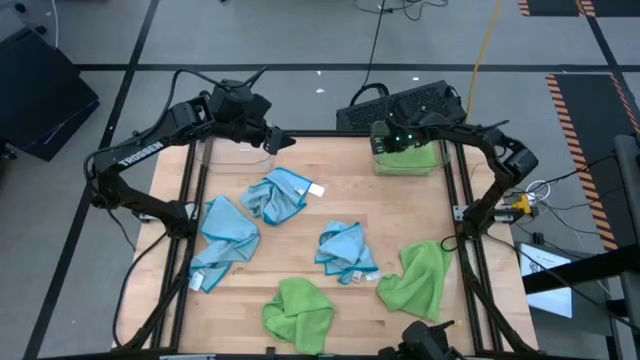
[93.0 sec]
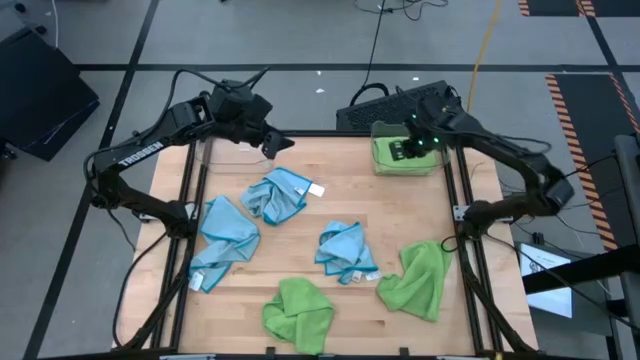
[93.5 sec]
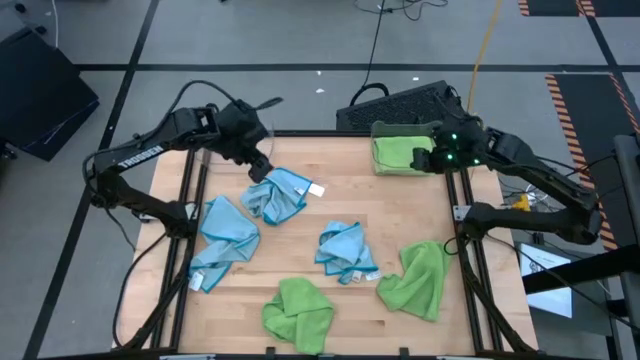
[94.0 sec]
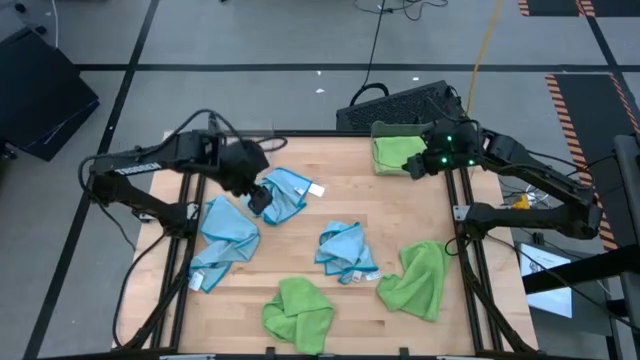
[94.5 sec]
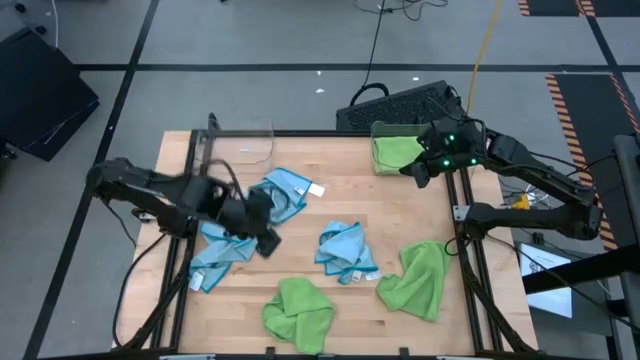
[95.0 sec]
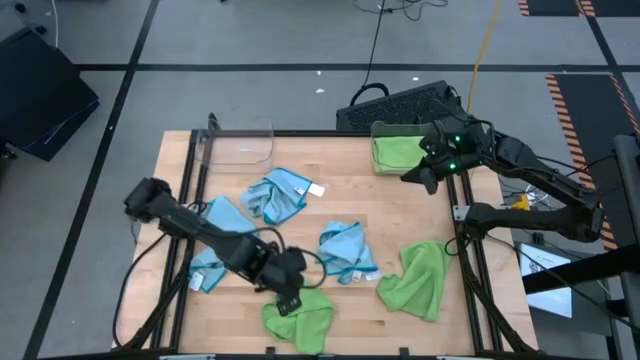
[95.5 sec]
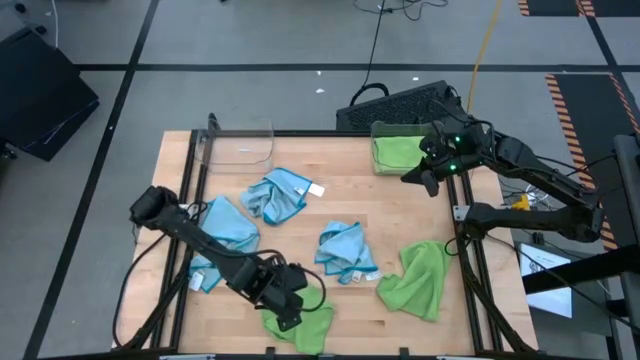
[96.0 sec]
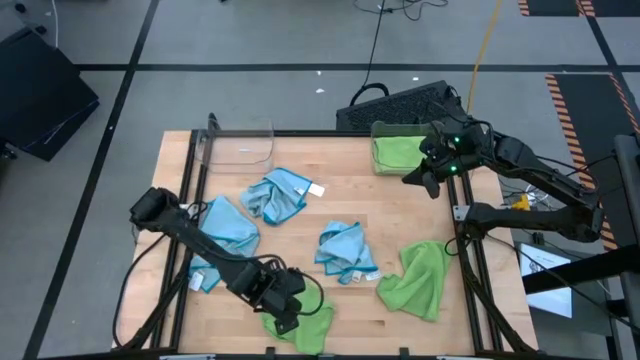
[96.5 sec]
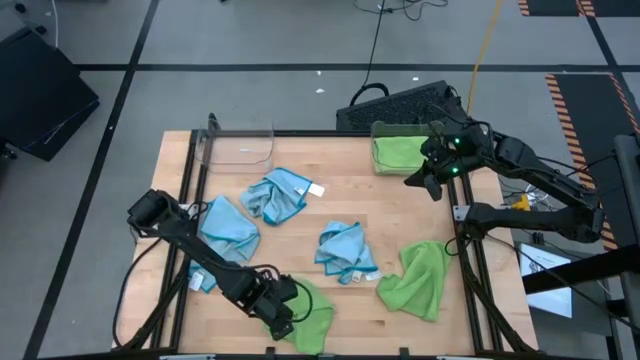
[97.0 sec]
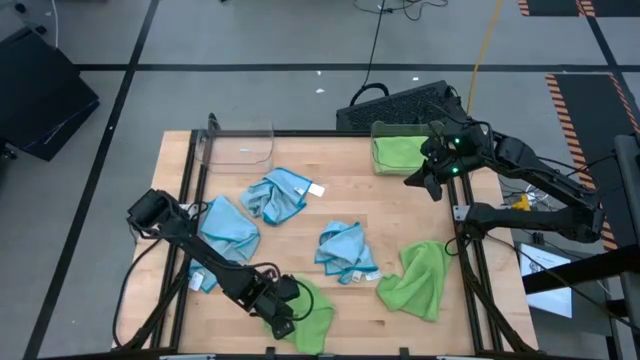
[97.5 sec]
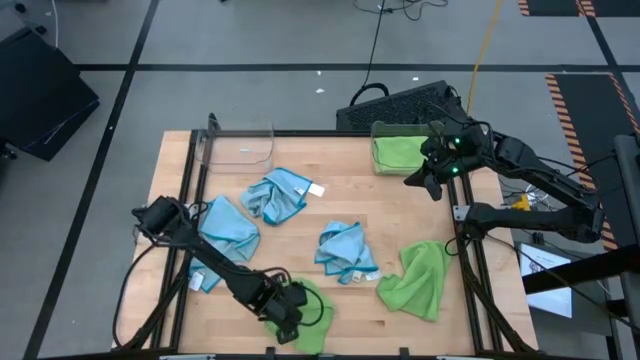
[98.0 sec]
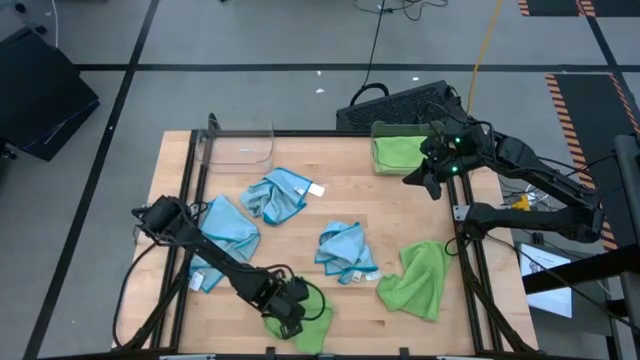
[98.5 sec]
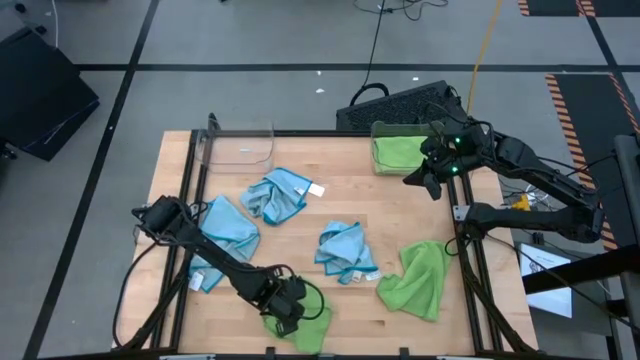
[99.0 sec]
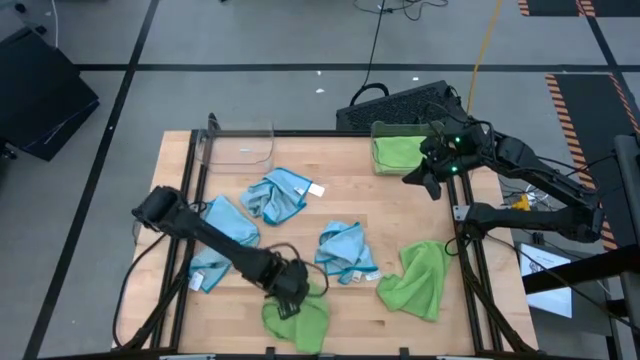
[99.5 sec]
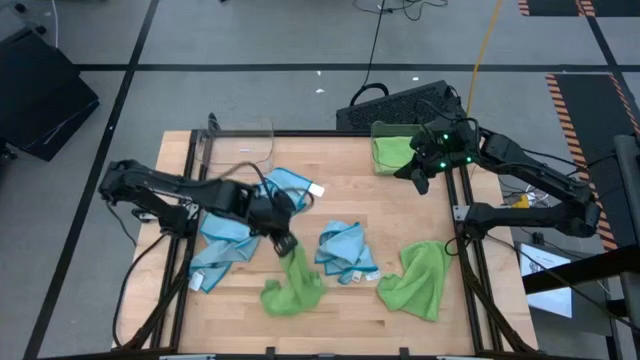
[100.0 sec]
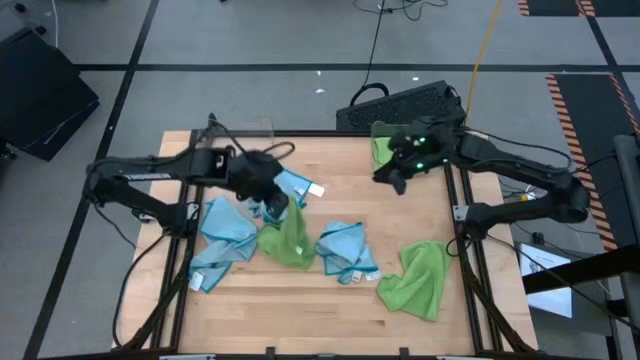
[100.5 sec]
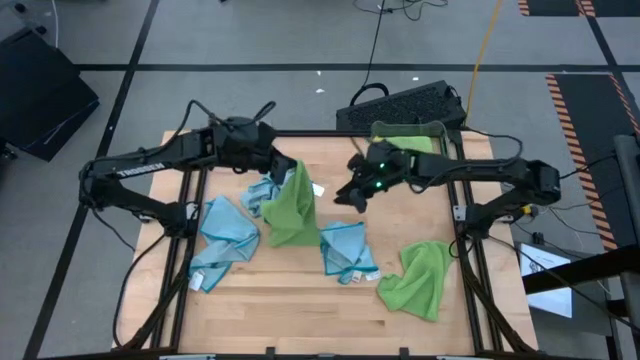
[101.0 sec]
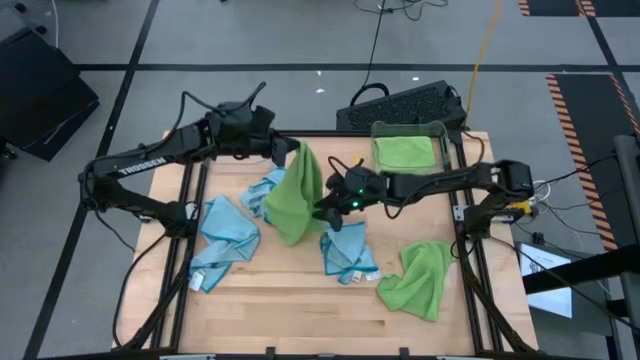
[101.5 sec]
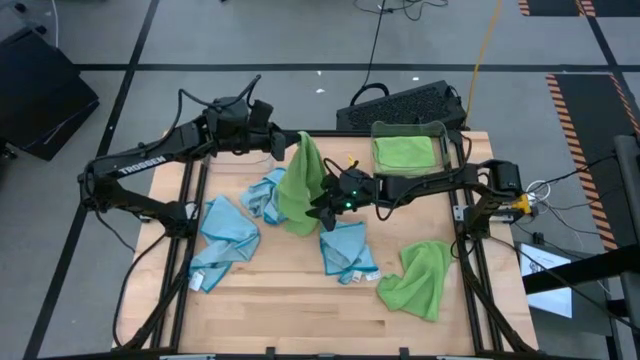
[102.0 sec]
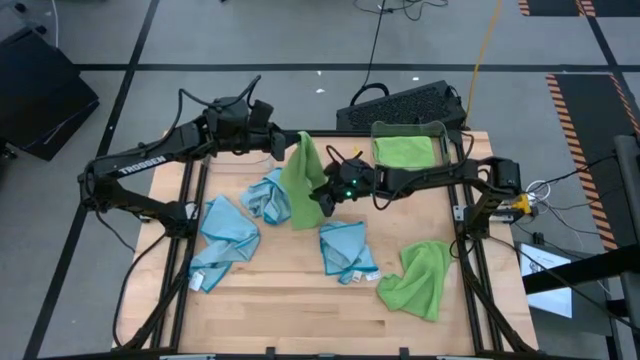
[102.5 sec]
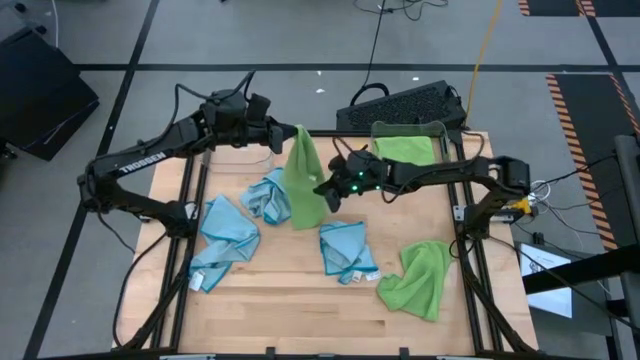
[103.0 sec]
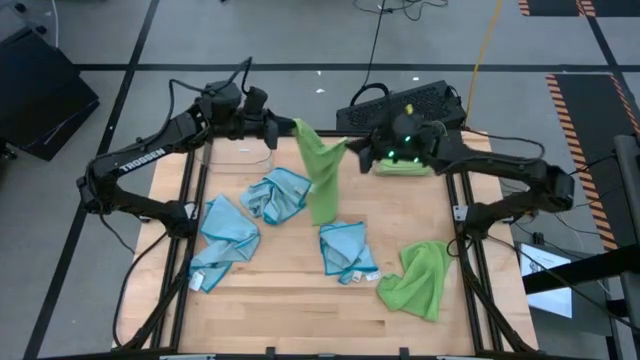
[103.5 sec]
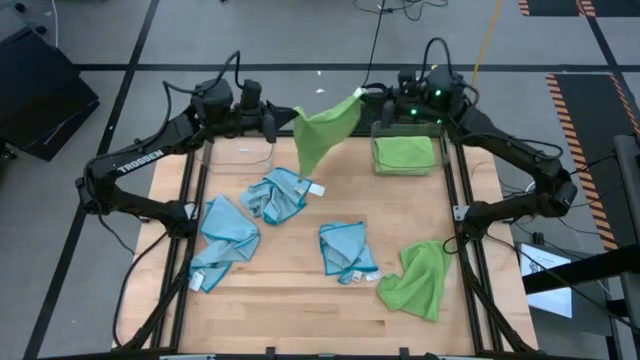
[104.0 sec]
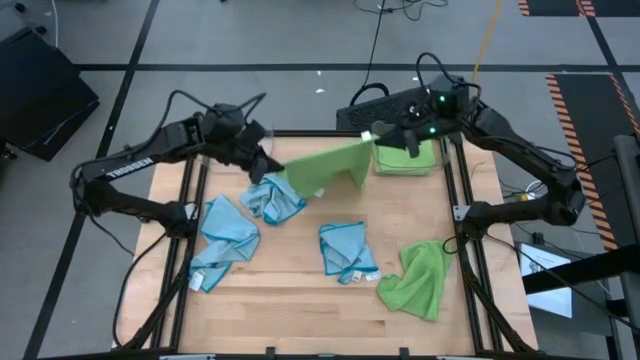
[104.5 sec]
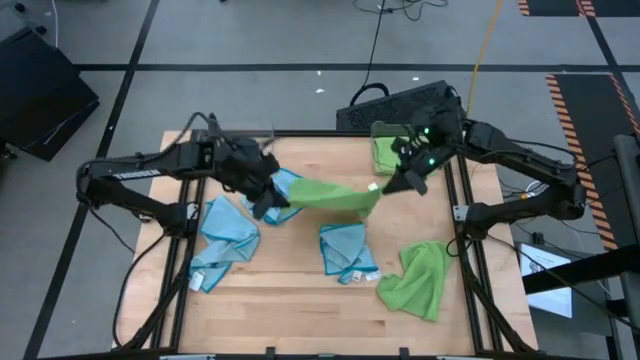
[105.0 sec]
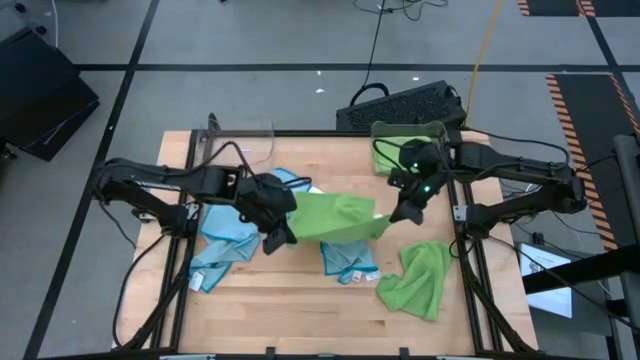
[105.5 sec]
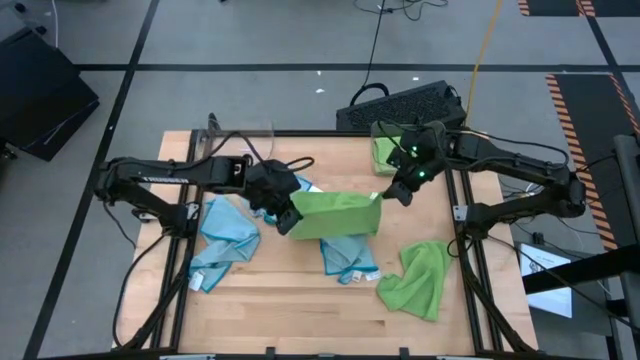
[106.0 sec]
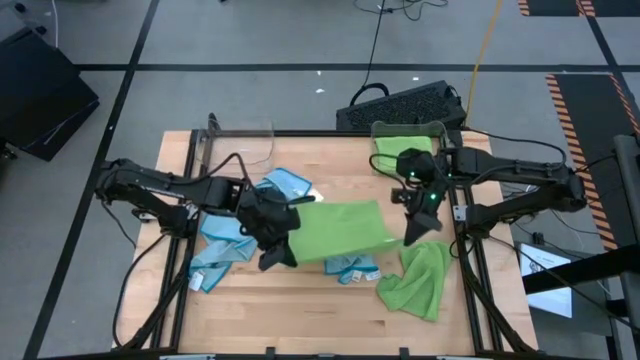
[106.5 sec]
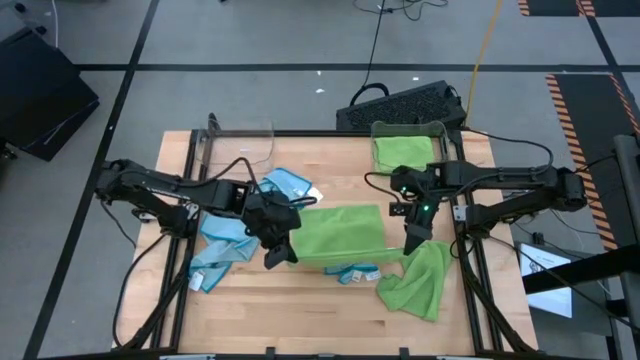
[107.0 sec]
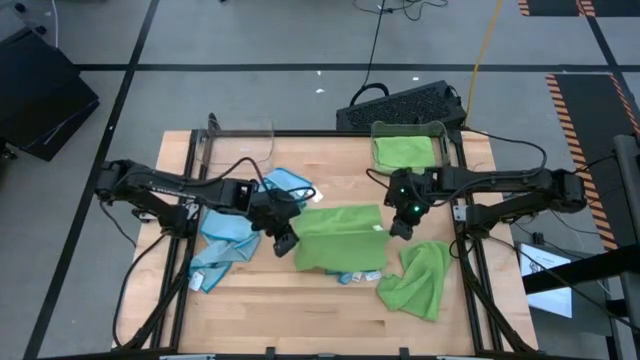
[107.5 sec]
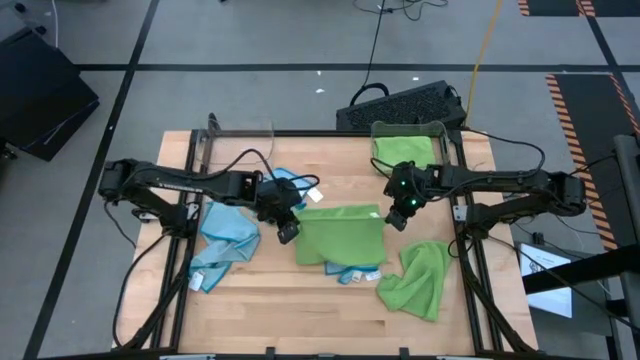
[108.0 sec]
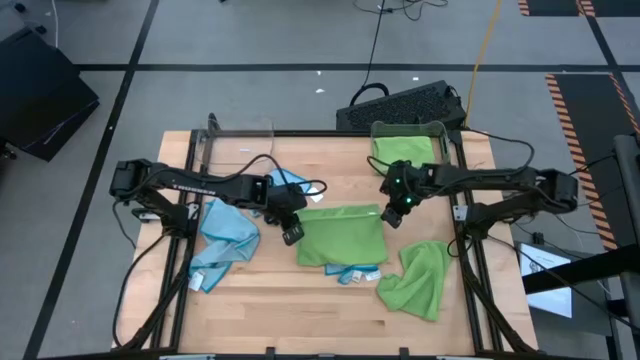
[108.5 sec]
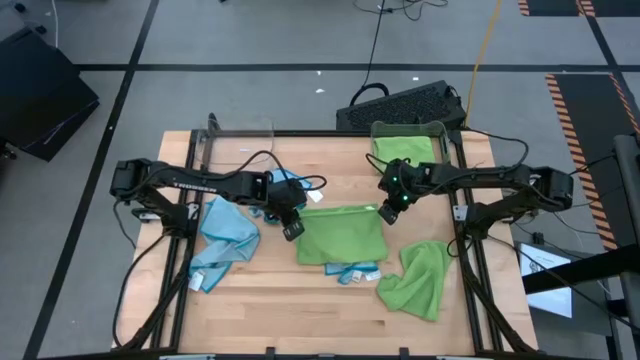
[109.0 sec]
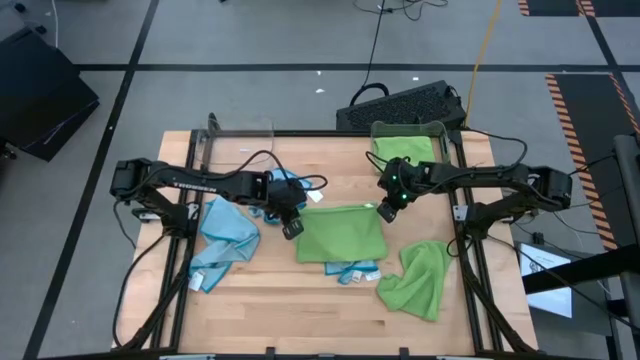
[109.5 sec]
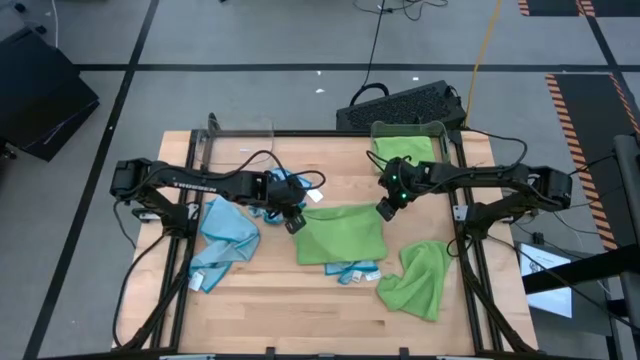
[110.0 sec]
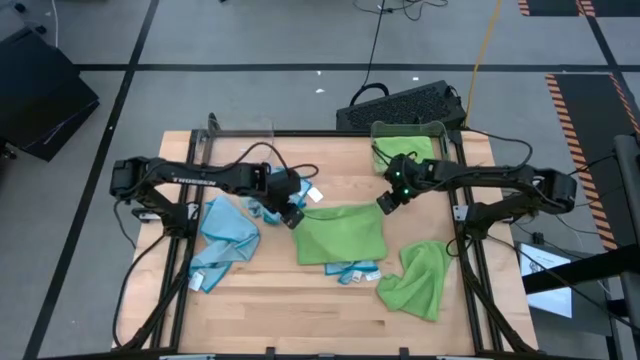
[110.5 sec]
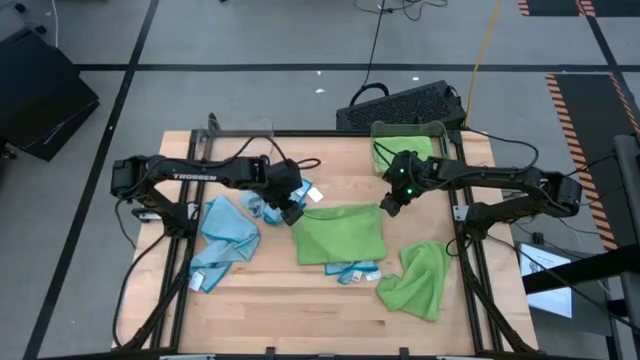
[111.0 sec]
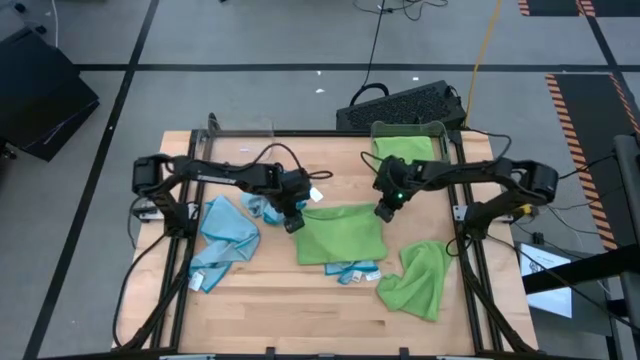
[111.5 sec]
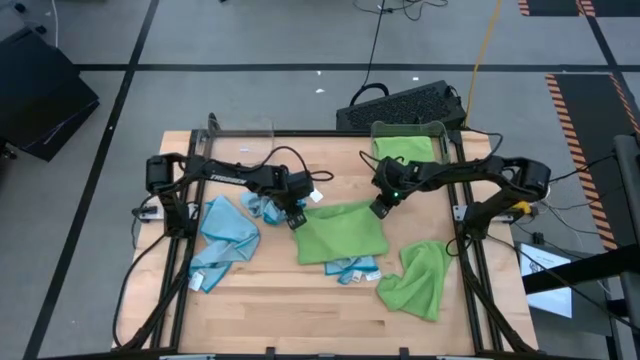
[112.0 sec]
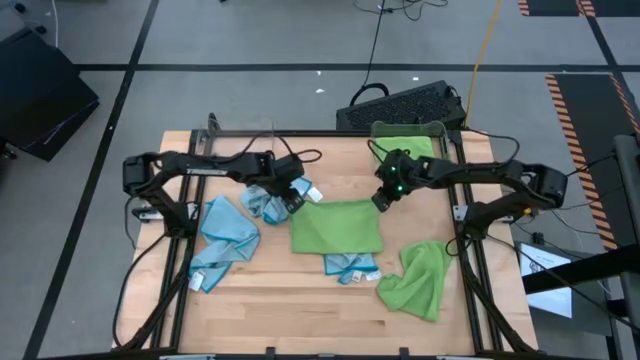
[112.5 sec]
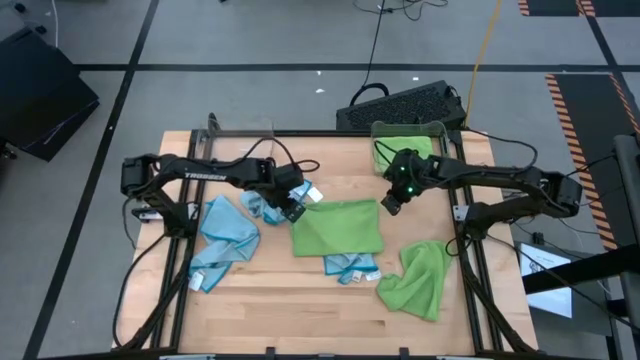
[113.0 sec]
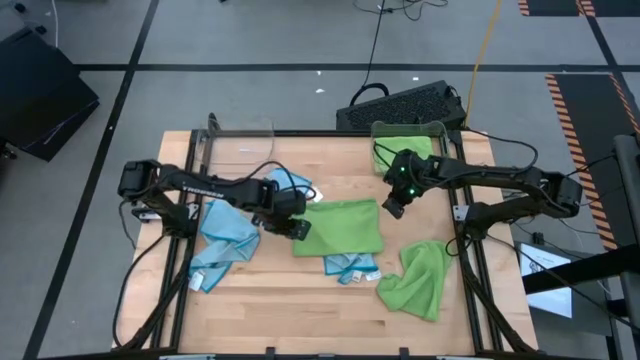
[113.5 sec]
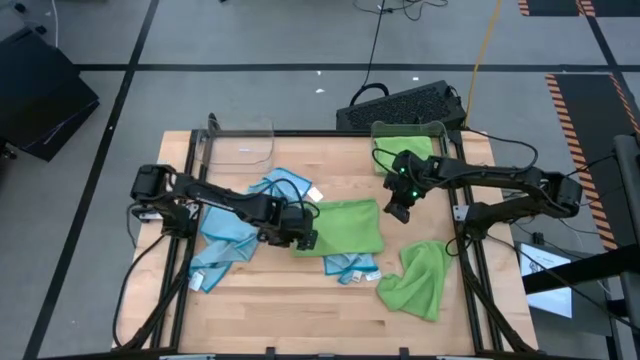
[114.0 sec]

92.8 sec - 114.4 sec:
Task: Sort microfiber towel by color & place in baskets
Fold the left green towel
